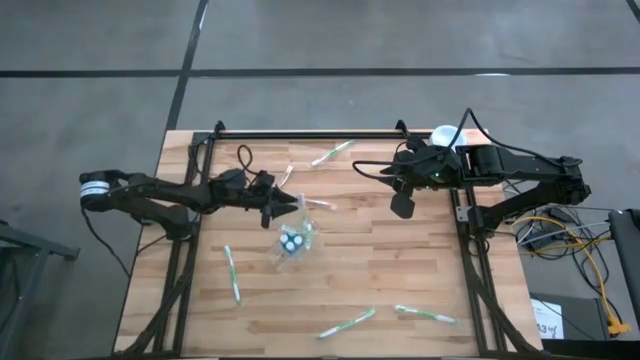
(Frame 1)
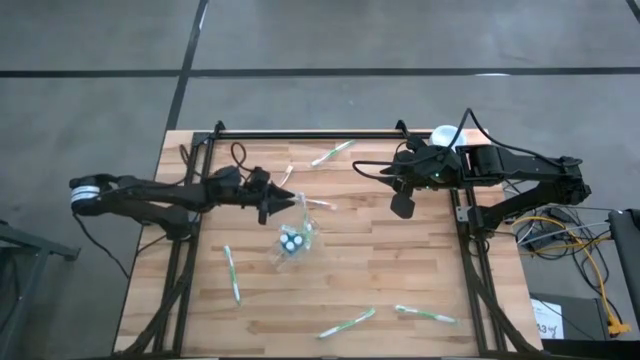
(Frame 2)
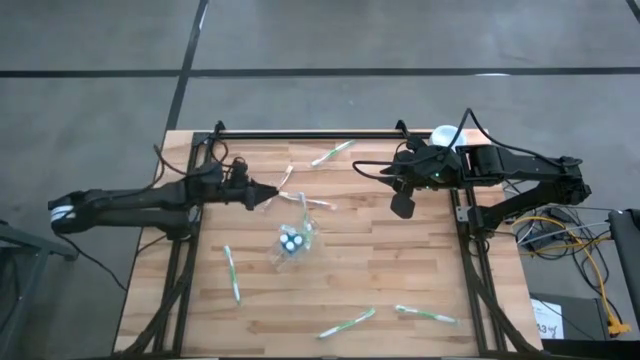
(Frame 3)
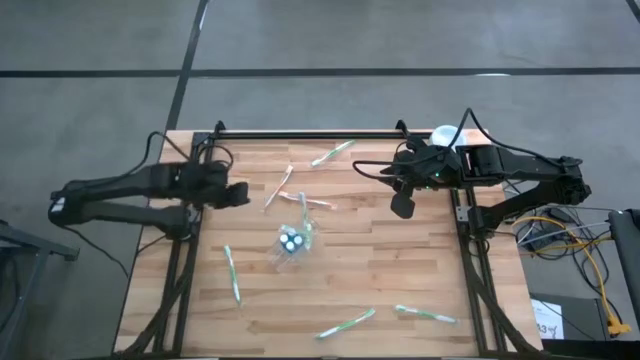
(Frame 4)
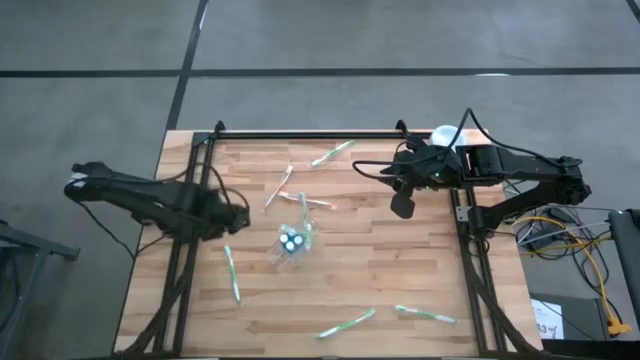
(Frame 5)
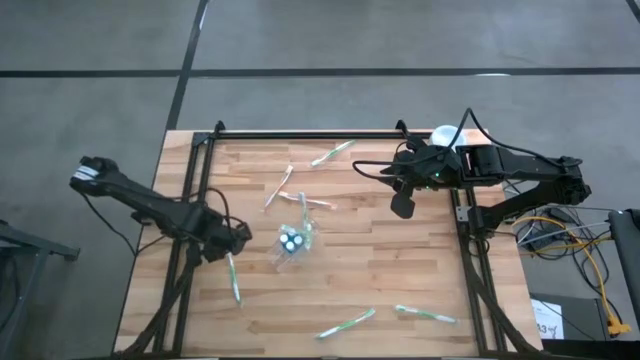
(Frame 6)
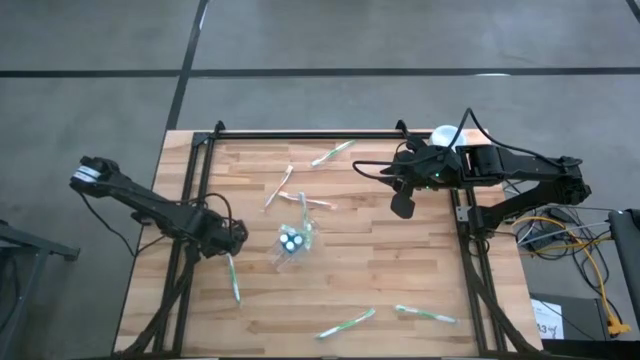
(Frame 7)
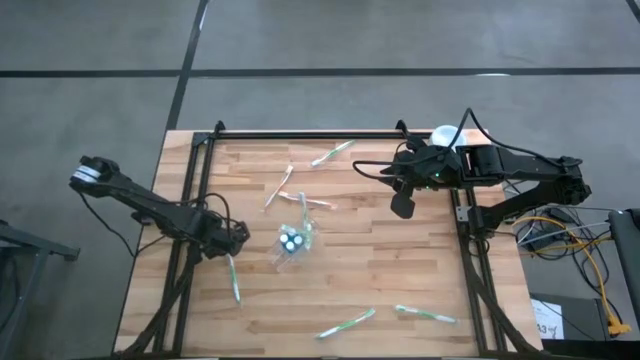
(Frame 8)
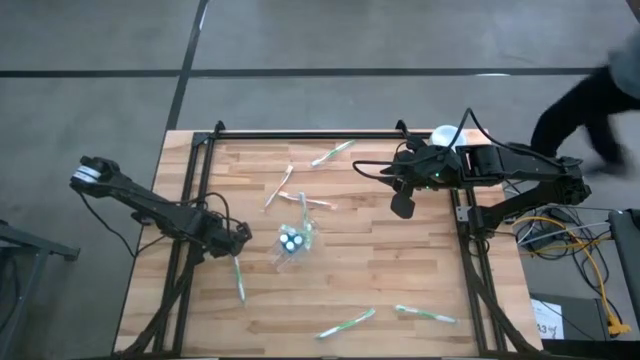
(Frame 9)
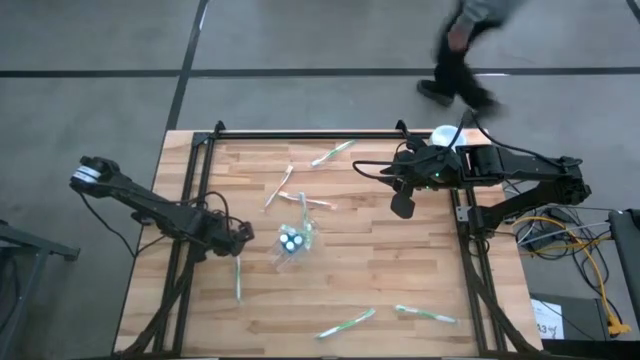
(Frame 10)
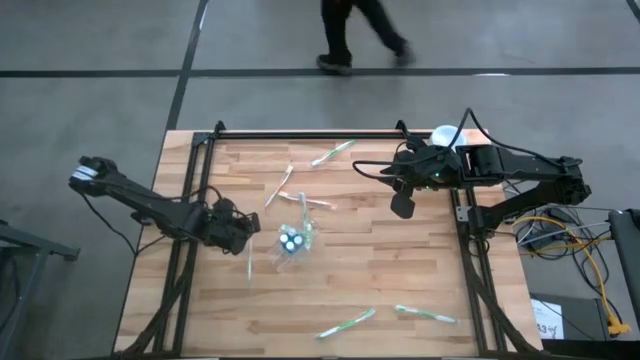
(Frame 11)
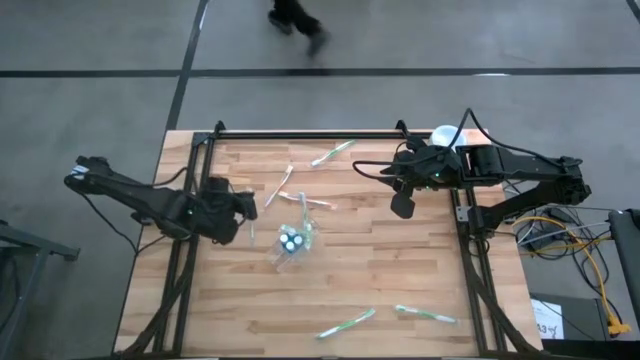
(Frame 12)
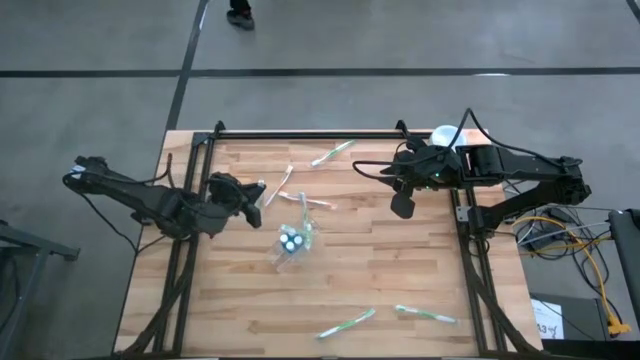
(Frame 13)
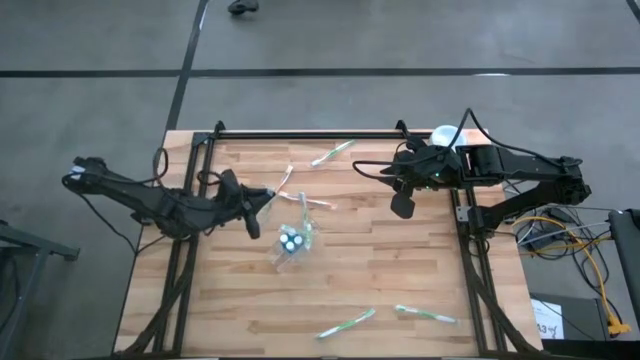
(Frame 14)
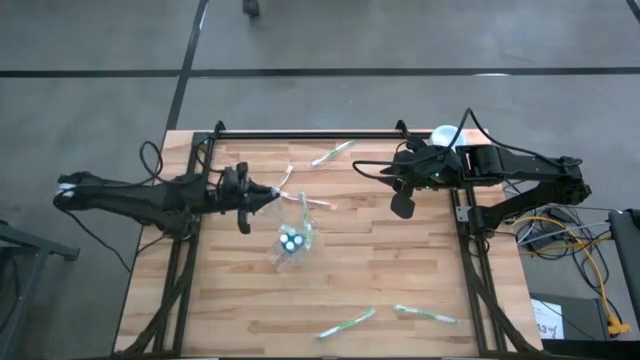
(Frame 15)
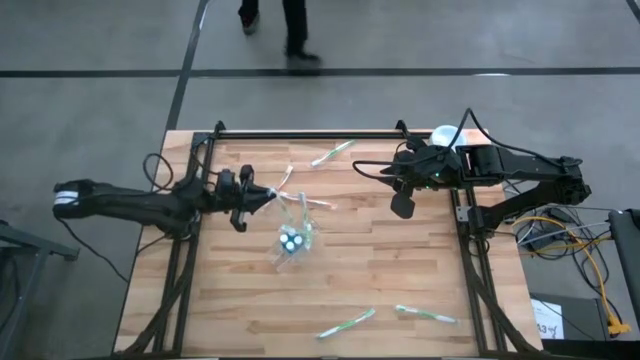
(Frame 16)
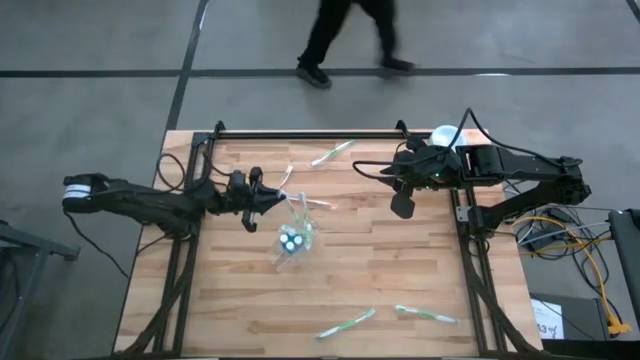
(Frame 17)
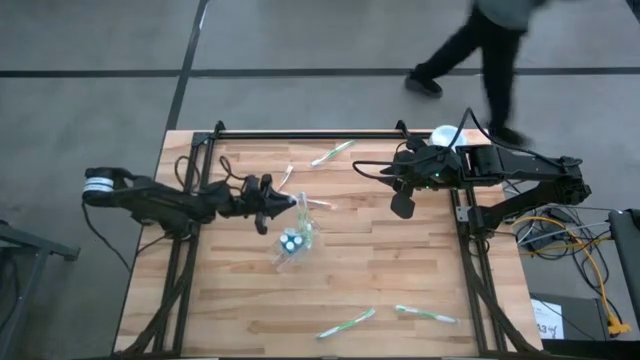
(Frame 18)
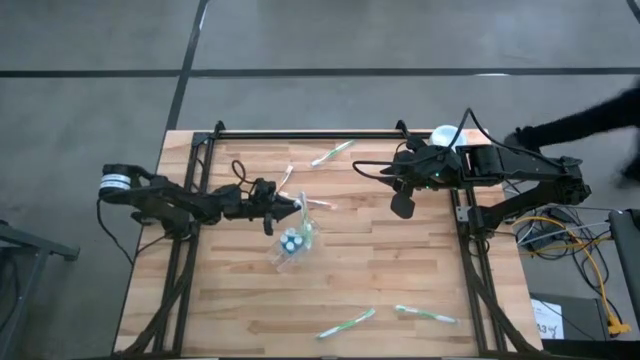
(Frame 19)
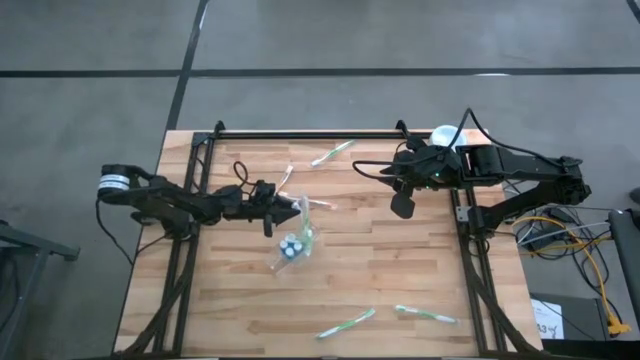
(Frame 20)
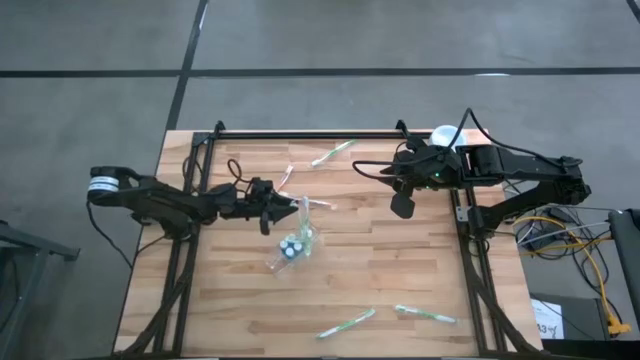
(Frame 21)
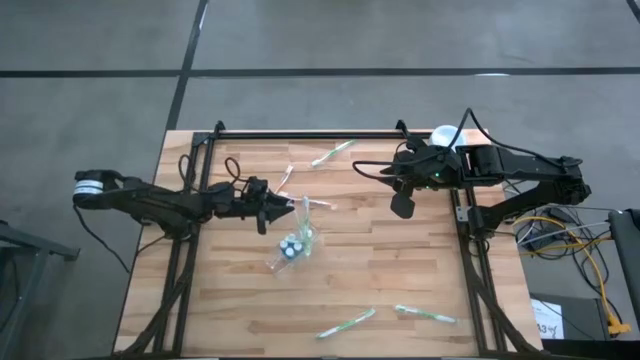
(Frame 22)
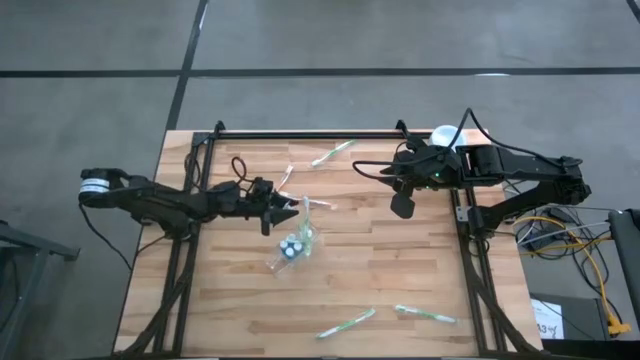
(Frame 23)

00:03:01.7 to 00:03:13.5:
Task: Pick & Place toothbrushing station
Put the green toothbrush into the transparent organizer

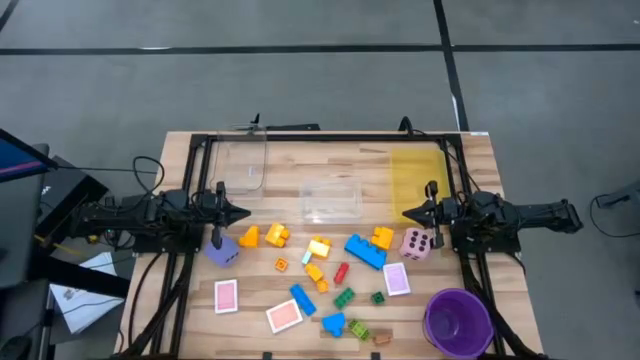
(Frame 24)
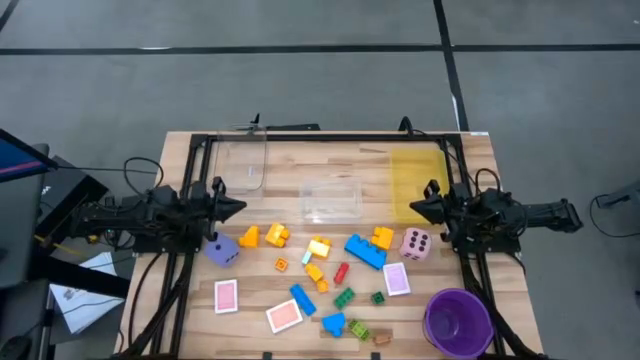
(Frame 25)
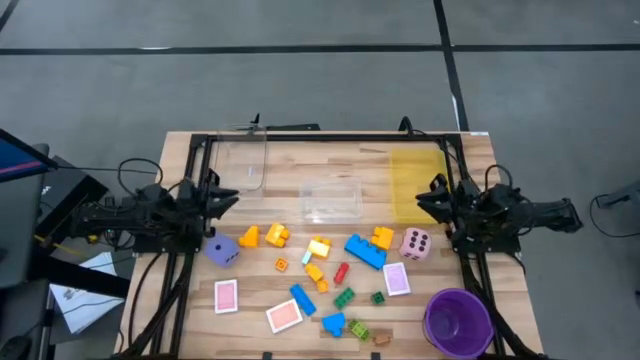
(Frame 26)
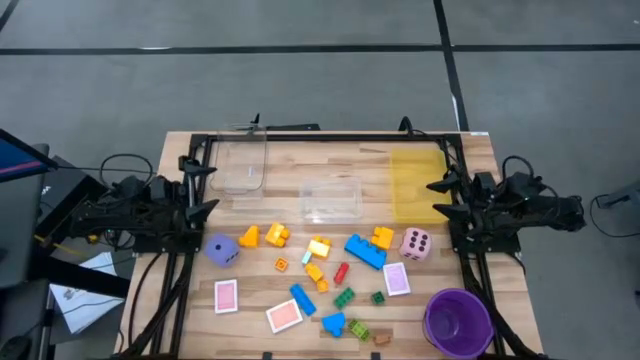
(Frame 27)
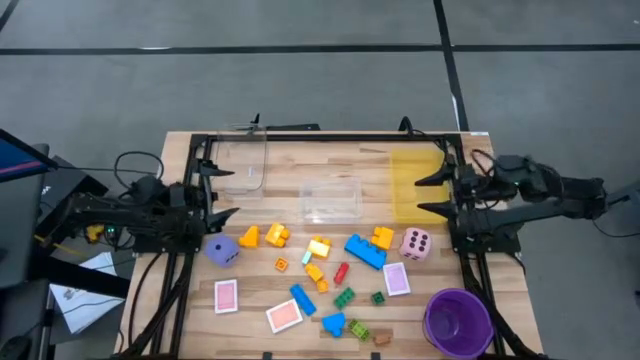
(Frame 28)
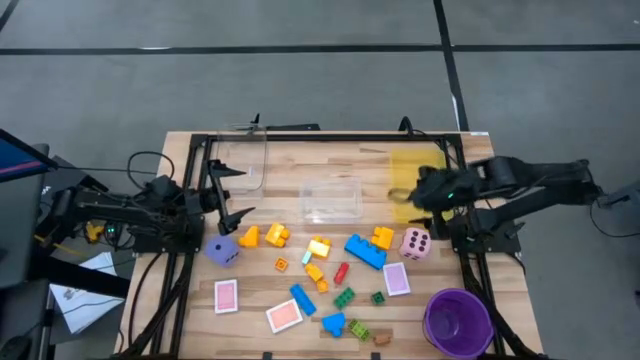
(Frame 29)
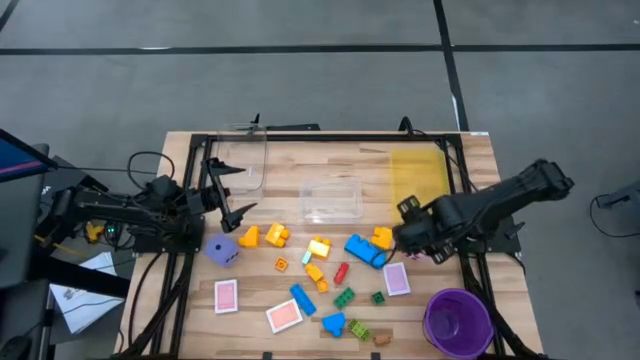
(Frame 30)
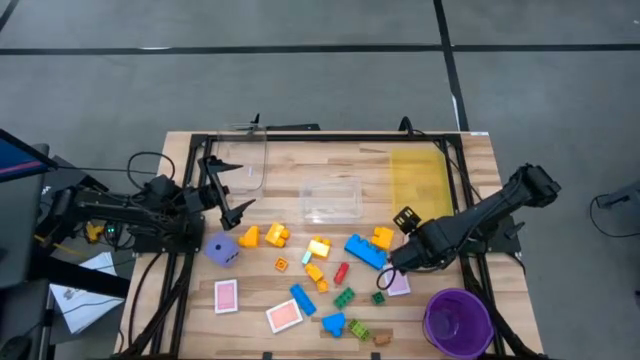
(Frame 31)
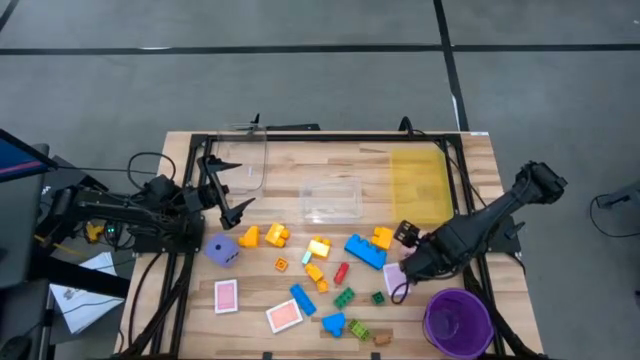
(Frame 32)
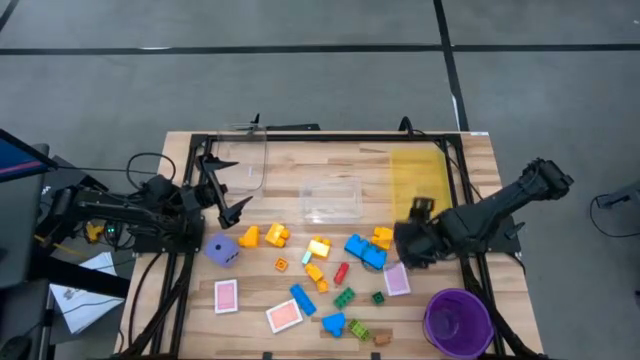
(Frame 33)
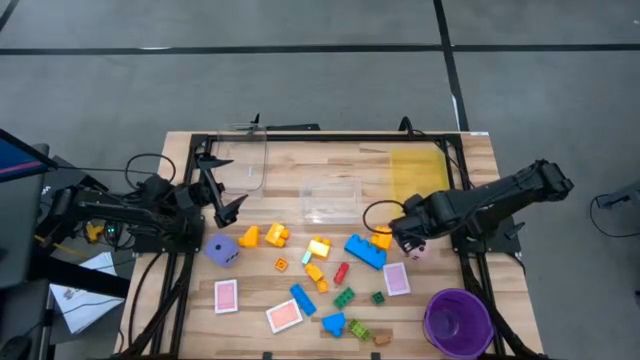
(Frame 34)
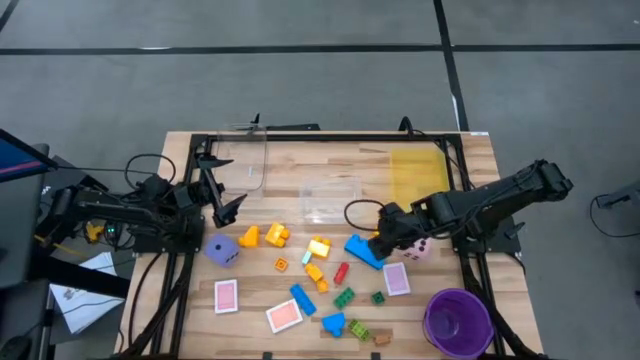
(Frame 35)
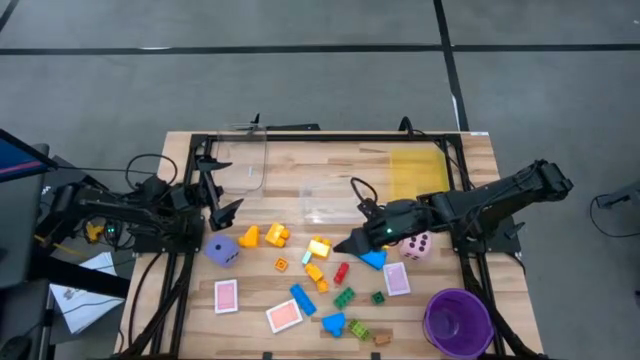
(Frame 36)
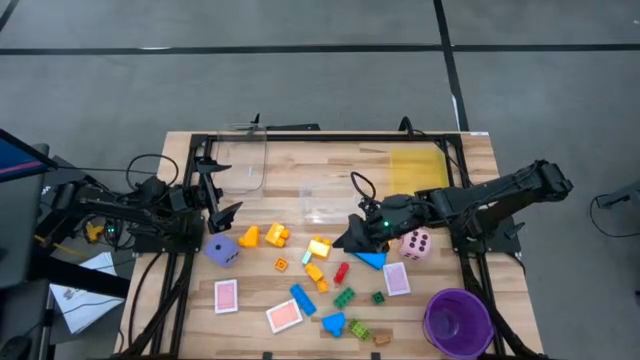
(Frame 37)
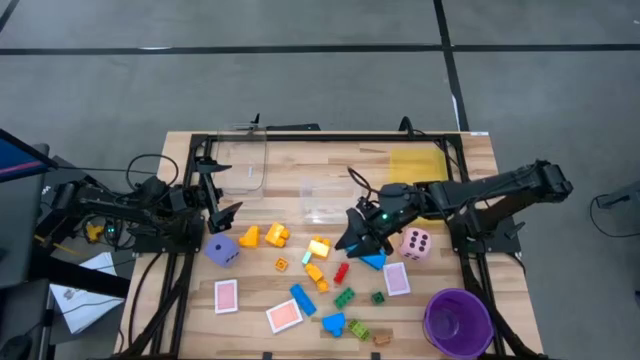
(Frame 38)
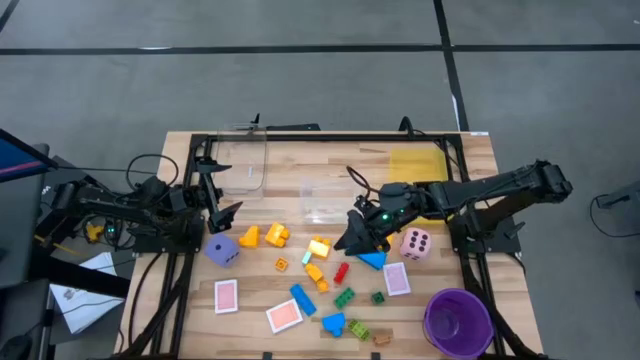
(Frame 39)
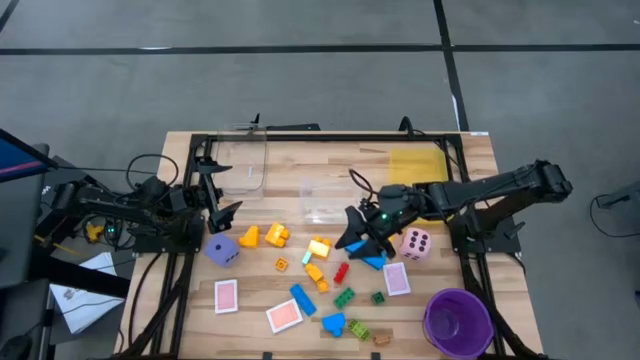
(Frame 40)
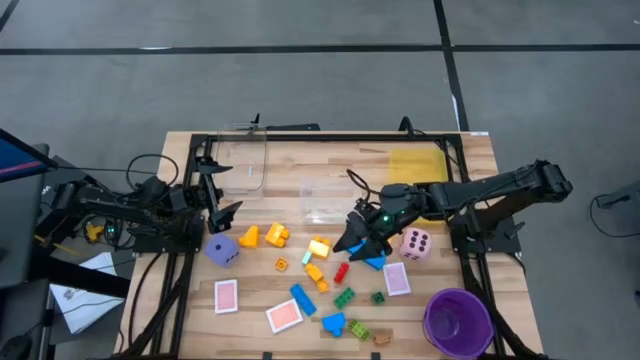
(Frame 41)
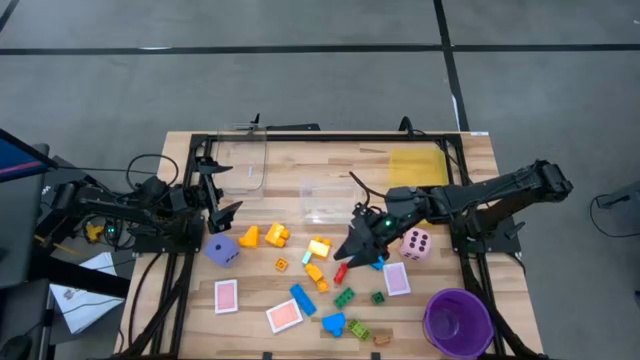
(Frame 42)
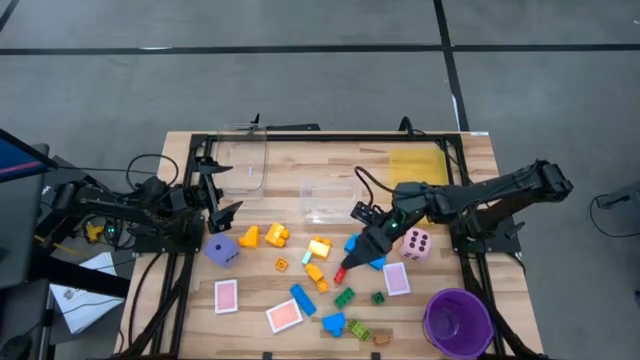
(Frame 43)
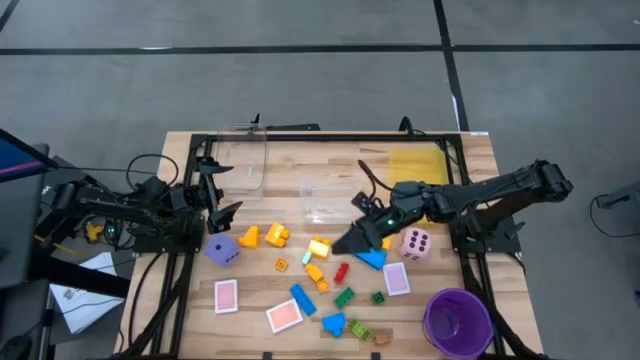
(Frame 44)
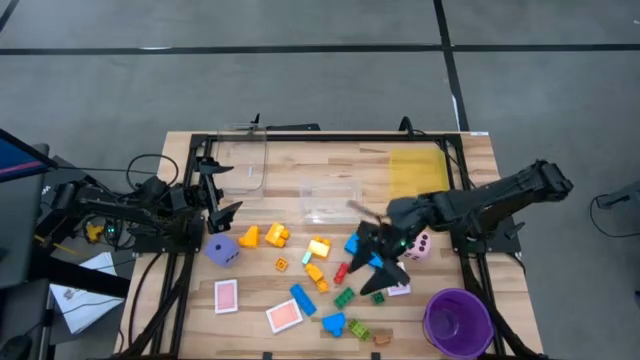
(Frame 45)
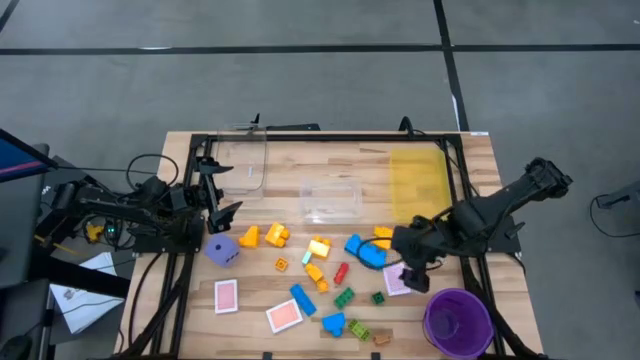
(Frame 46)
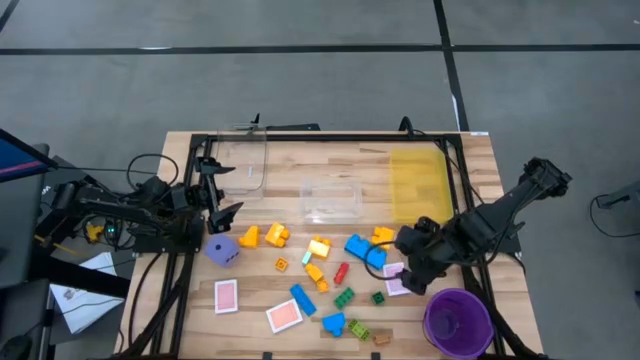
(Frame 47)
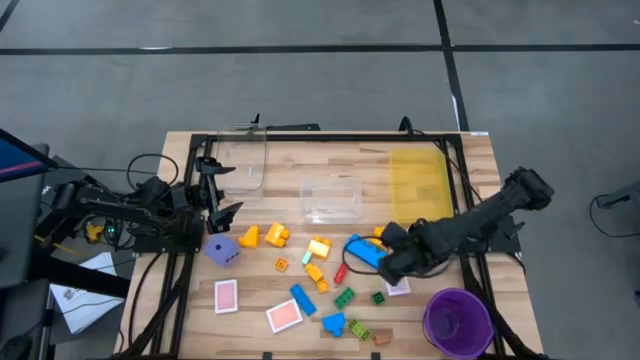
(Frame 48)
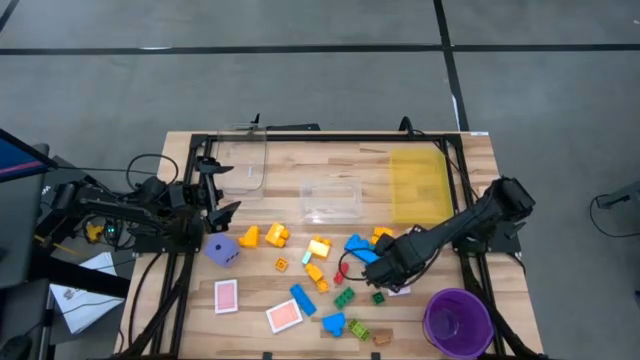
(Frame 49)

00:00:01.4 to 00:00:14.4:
Task: Pick & Place Toys
Put the pink die into the top transparent bin
